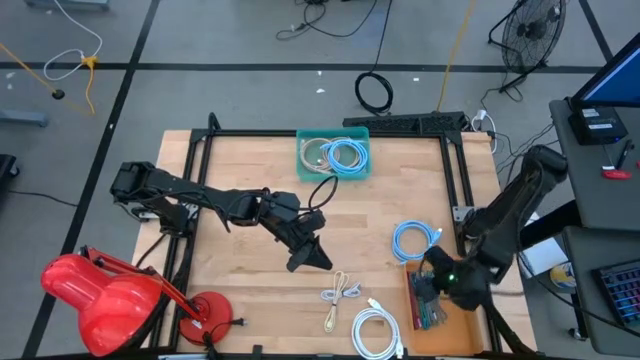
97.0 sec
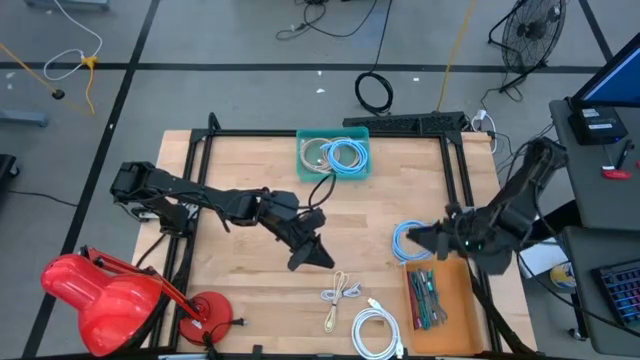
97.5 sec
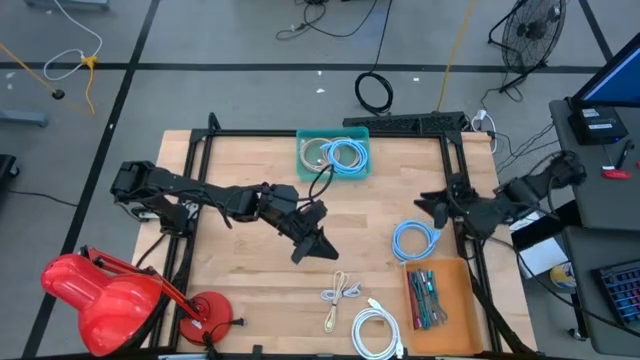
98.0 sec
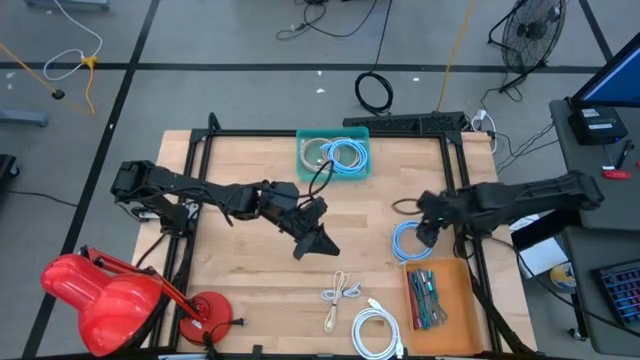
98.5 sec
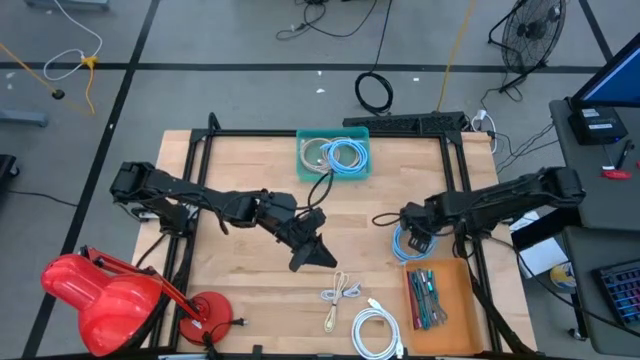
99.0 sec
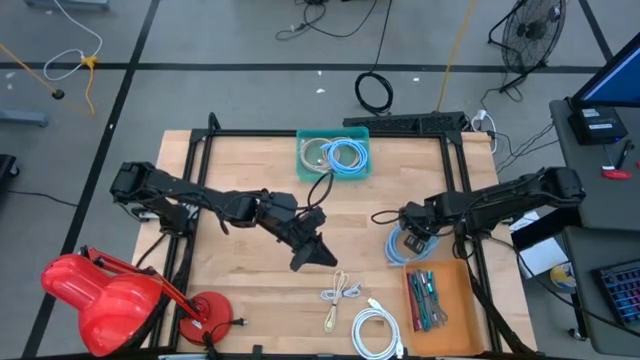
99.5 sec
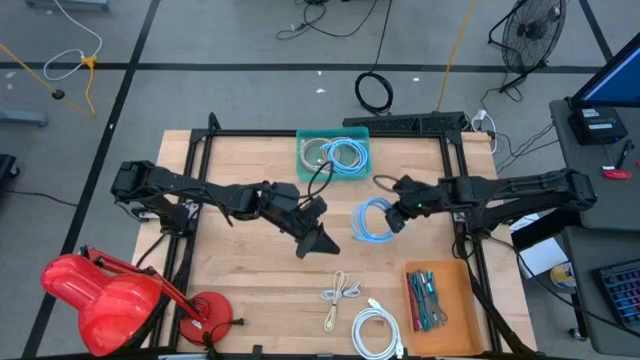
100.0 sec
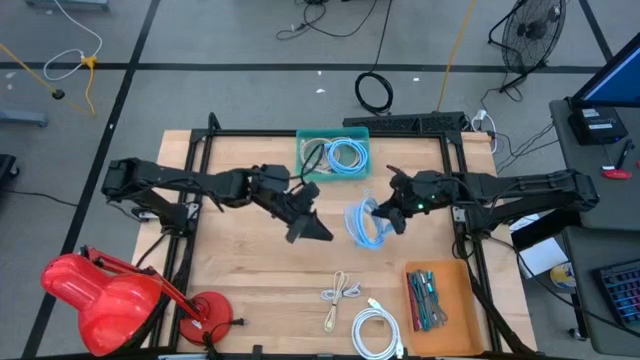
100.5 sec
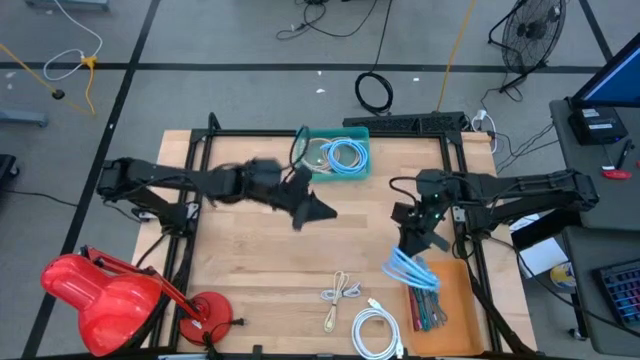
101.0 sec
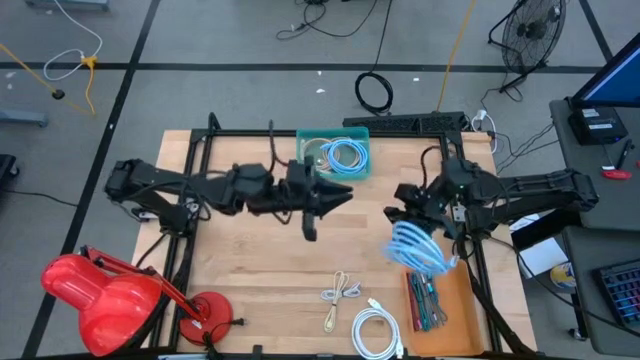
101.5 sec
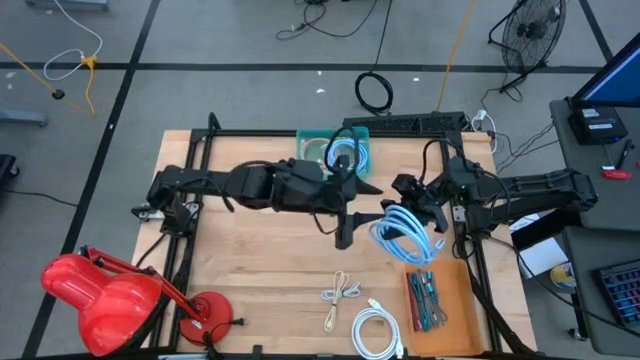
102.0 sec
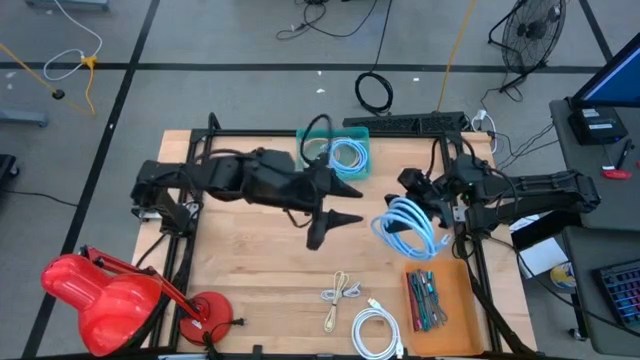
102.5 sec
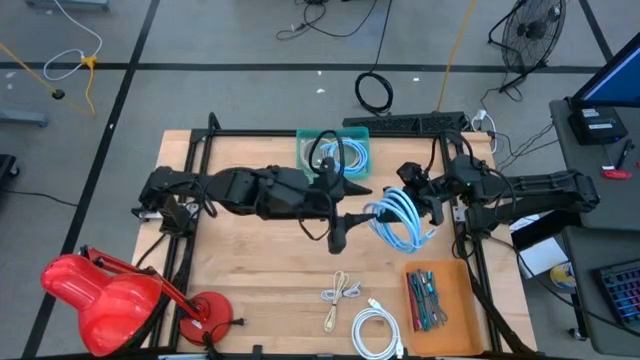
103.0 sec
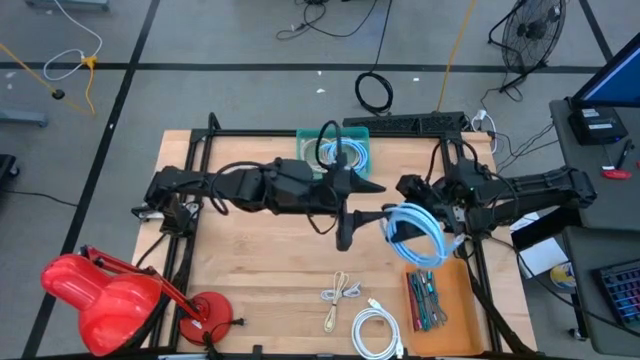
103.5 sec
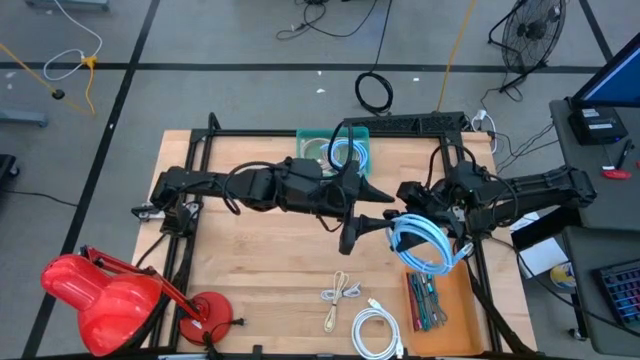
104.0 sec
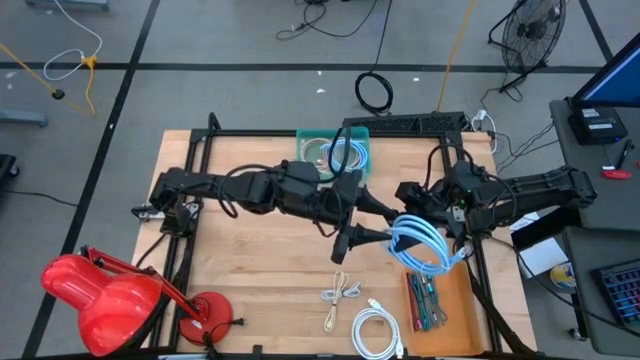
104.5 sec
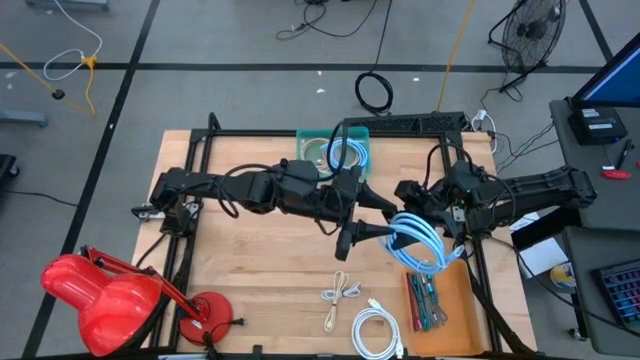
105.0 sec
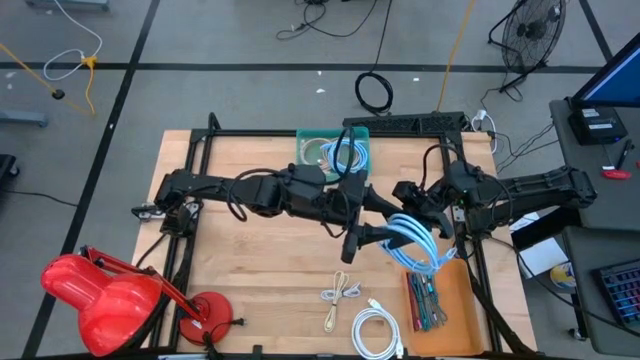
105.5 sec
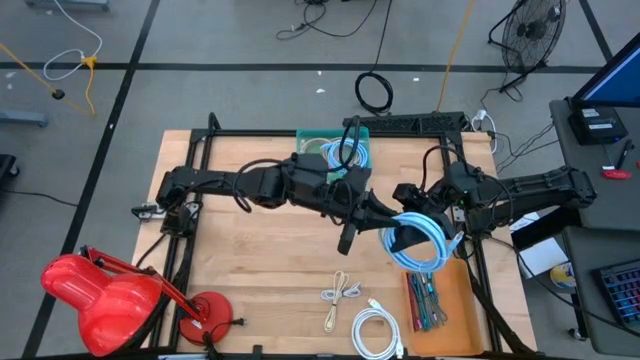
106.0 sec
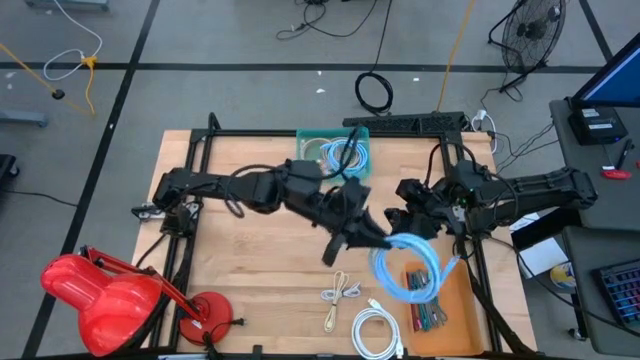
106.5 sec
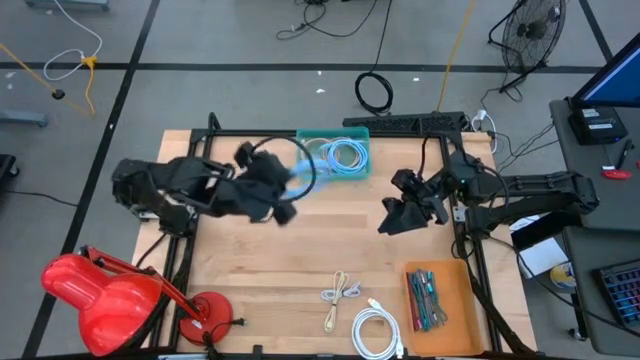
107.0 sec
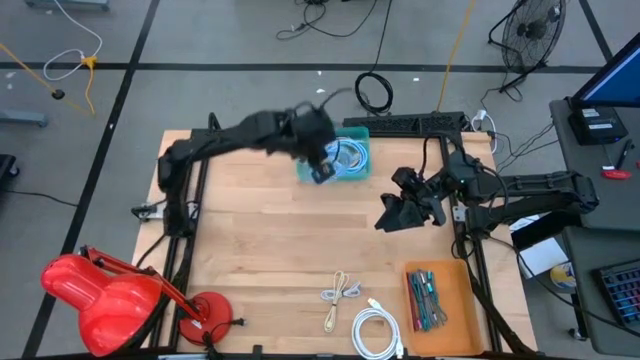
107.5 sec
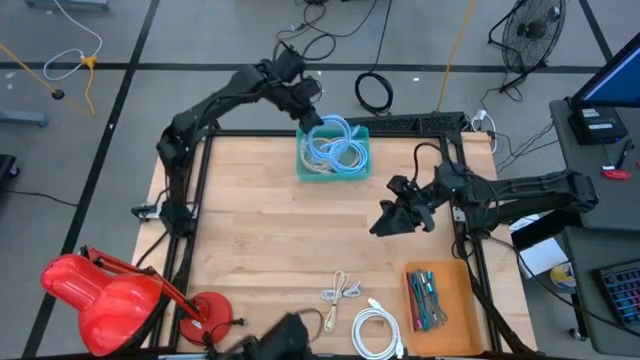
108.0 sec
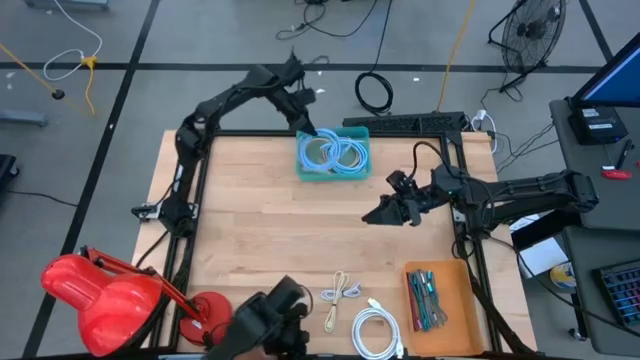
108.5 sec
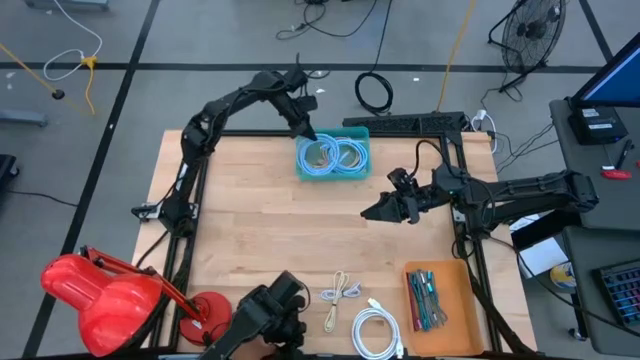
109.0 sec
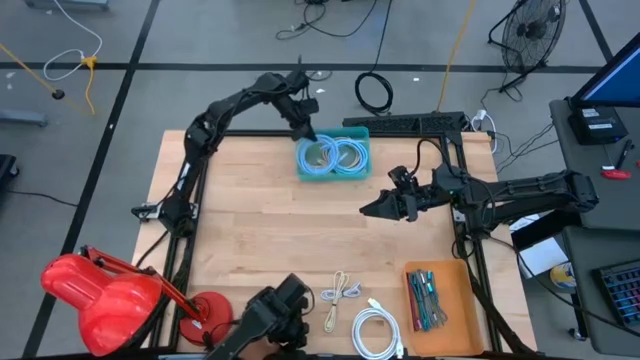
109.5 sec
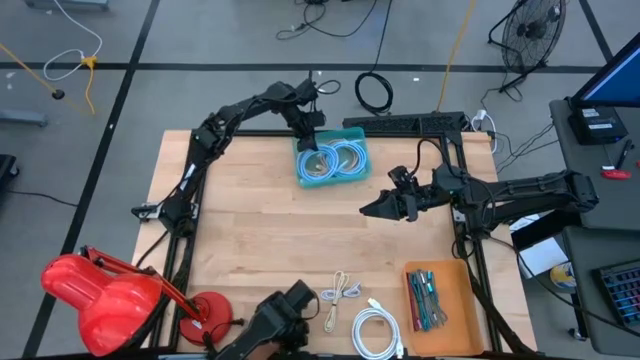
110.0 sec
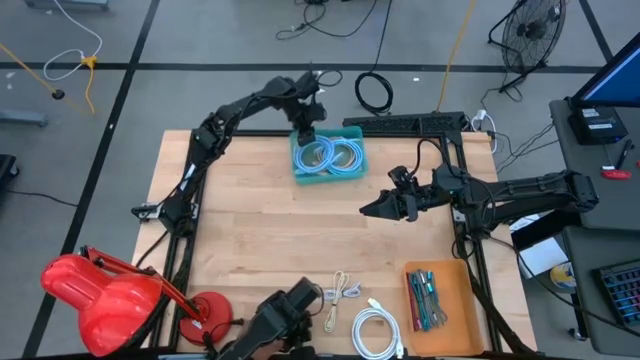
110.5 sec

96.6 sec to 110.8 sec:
Task: Pick & Place USB Port
Put the blue display cable into the blue bin

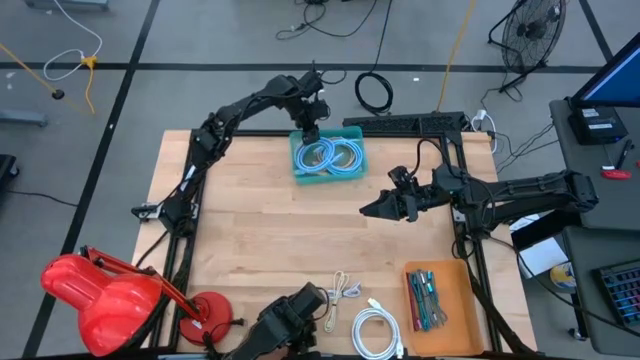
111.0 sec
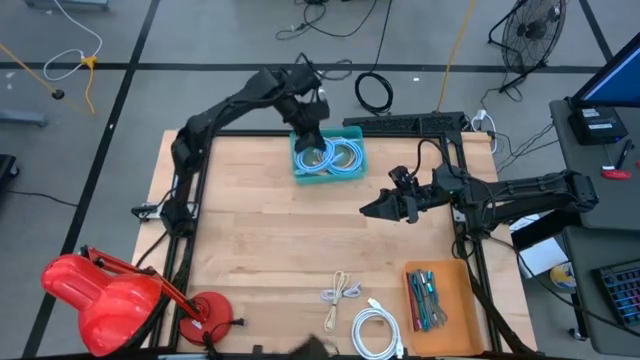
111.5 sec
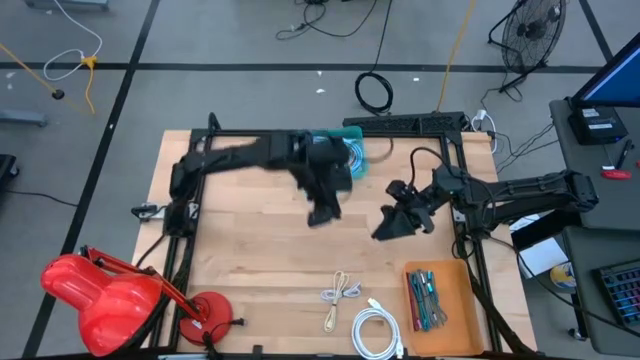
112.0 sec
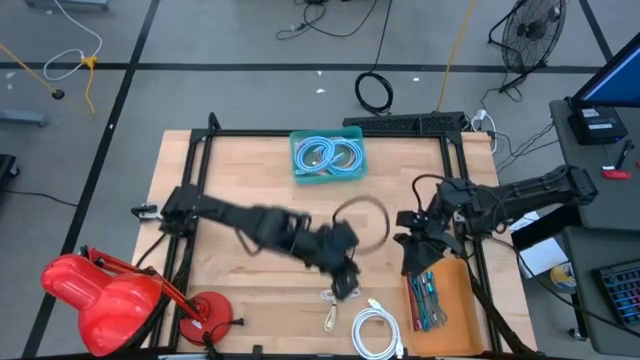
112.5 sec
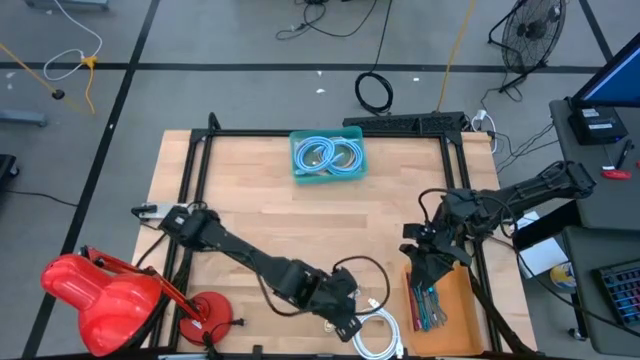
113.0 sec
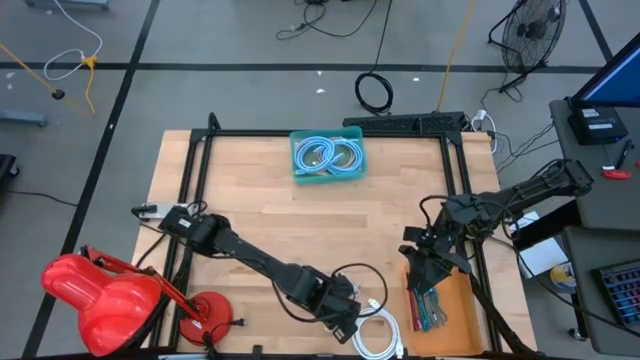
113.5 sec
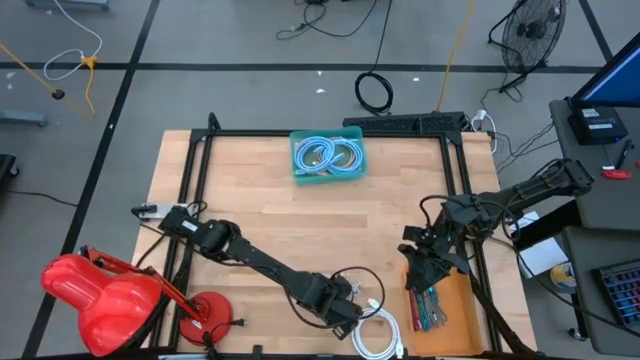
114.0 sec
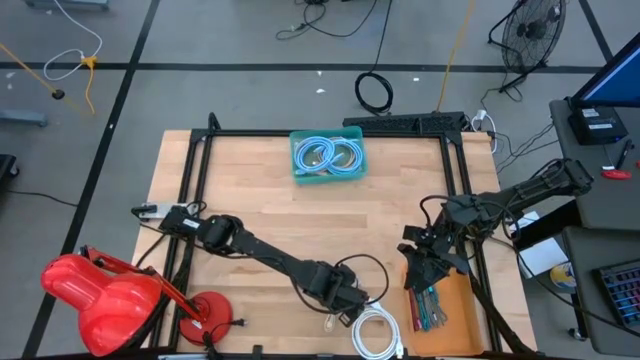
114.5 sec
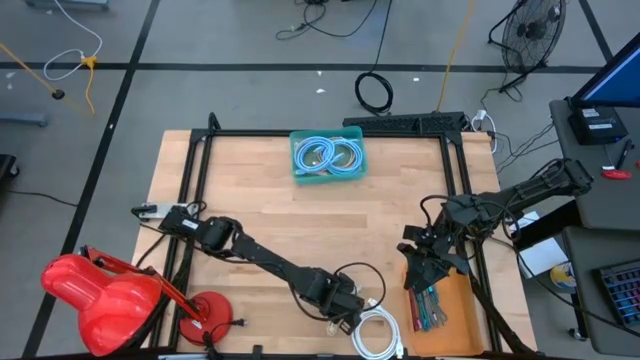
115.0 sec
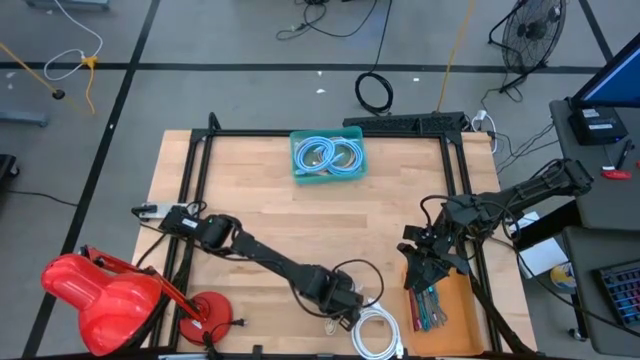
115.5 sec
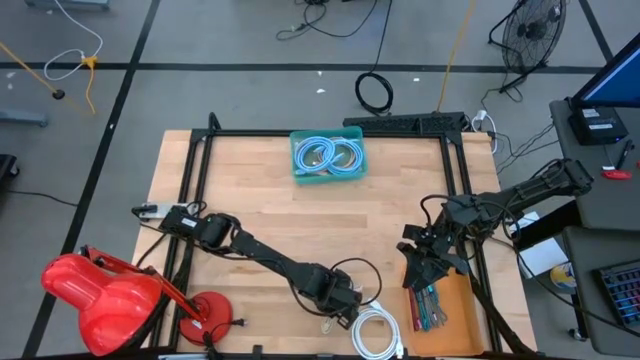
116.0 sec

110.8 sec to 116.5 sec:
Put the brown charger cable into the orange bin

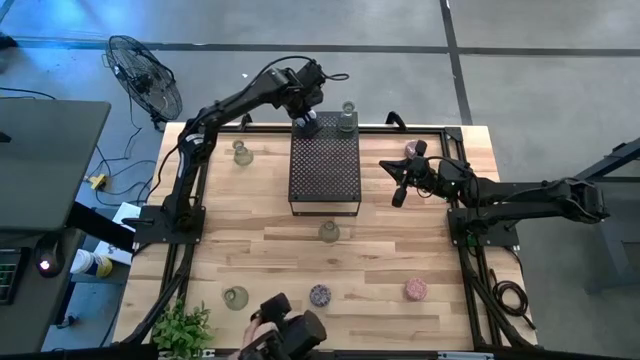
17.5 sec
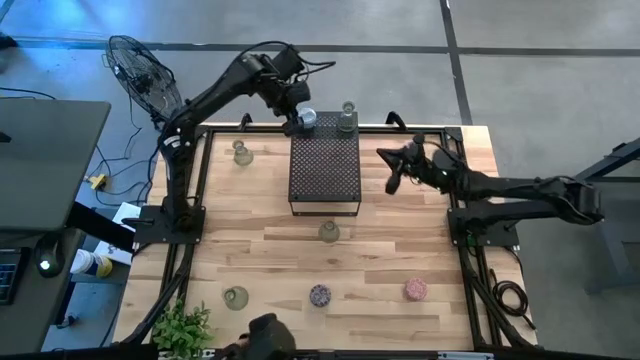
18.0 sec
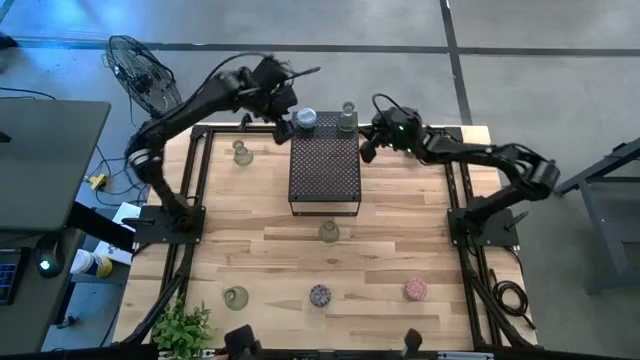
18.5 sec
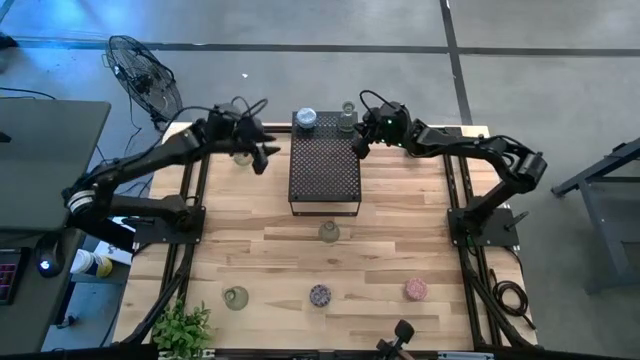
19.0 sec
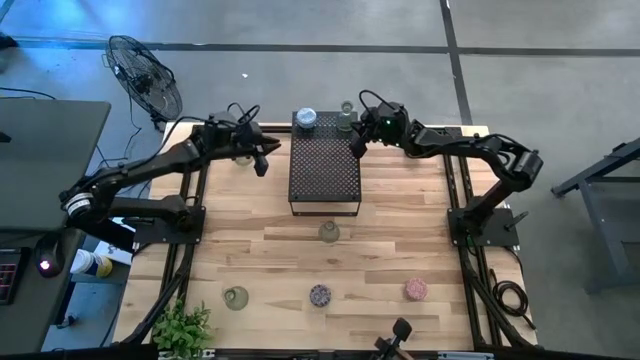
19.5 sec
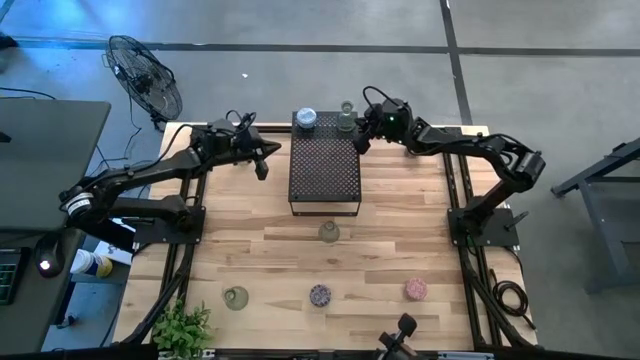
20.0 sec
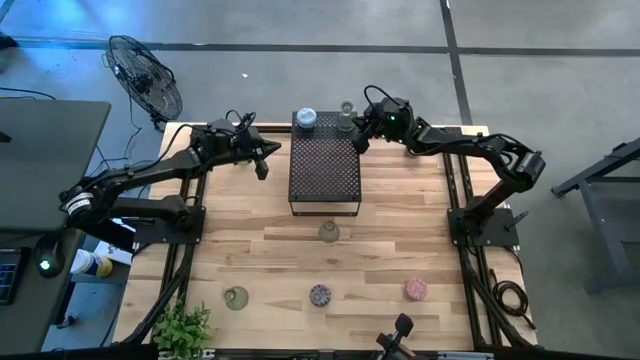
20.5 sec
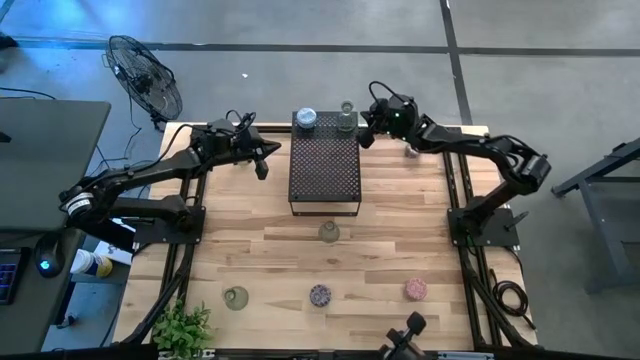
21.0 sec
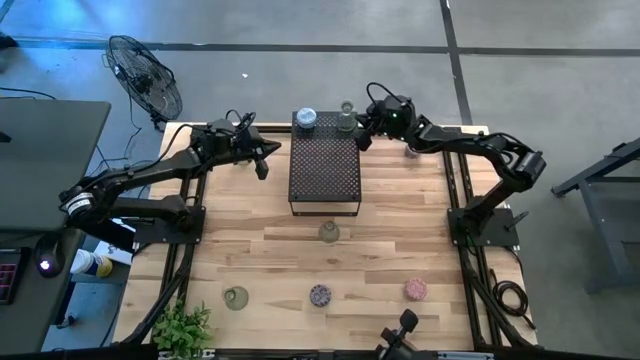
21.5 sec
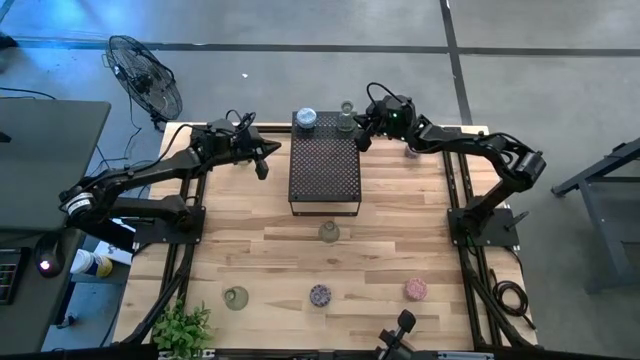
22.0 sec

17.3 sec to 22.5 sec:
Task: Pick & Place candle stick holders
Adjust the green glass candle holder on the shelf
